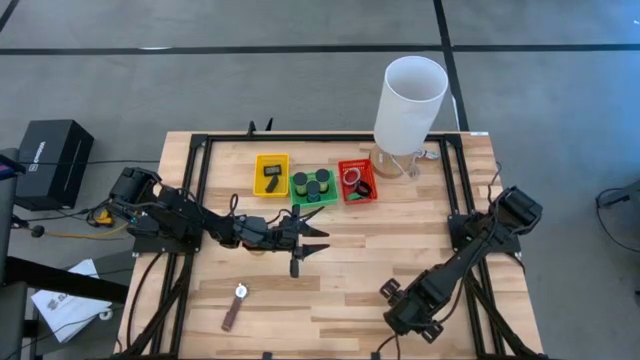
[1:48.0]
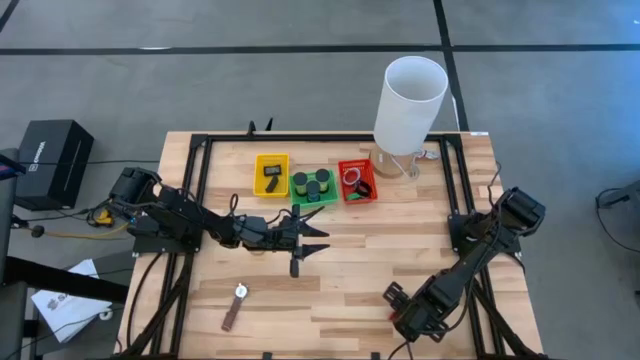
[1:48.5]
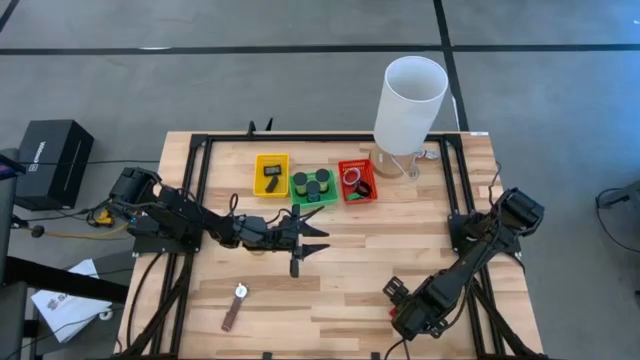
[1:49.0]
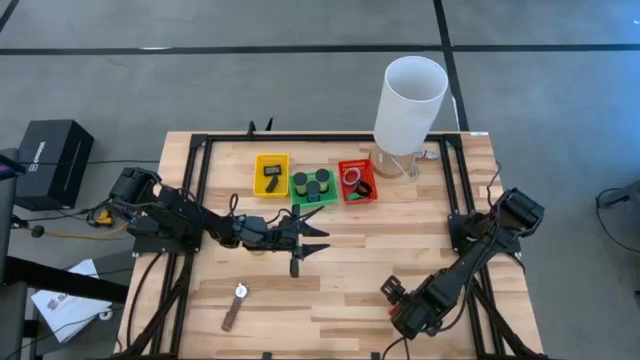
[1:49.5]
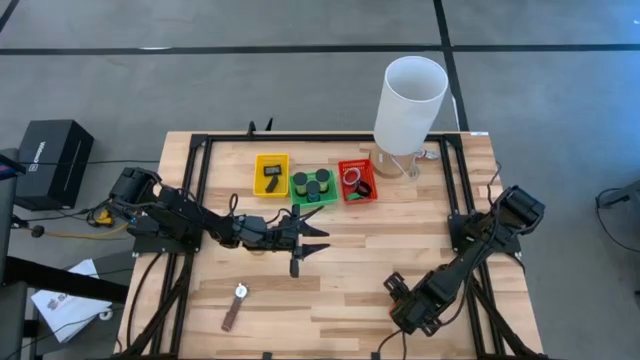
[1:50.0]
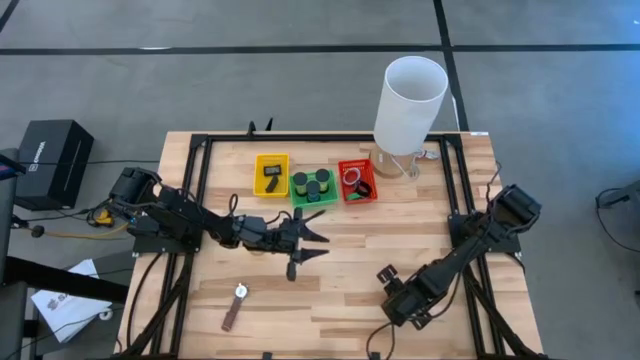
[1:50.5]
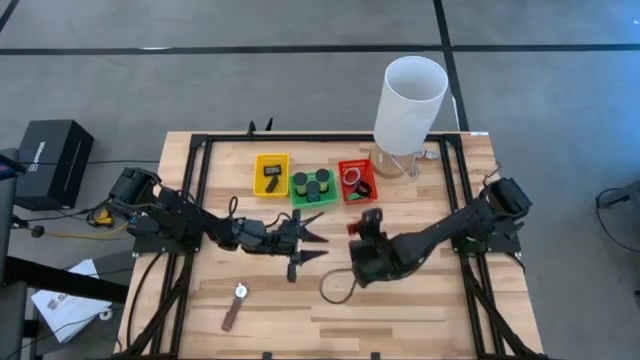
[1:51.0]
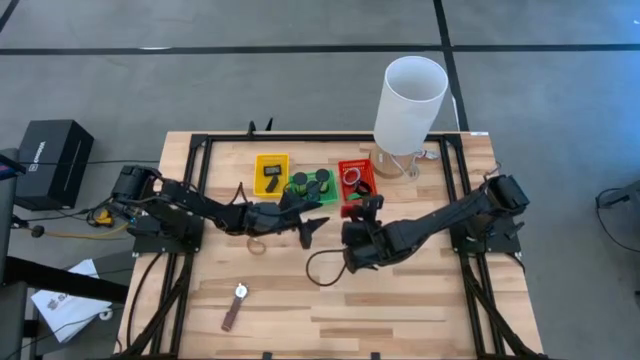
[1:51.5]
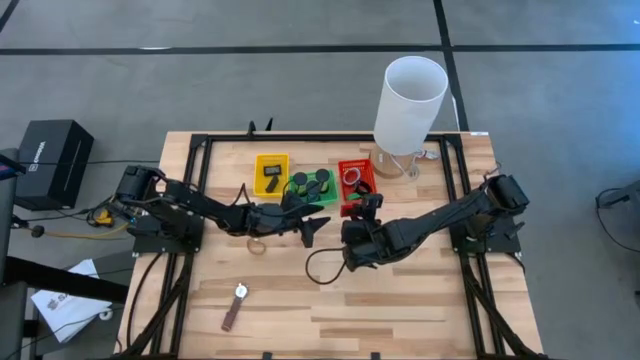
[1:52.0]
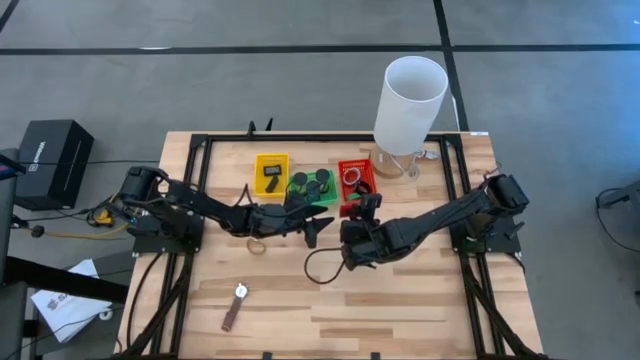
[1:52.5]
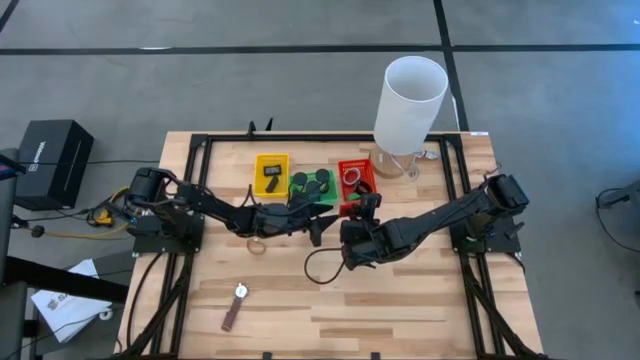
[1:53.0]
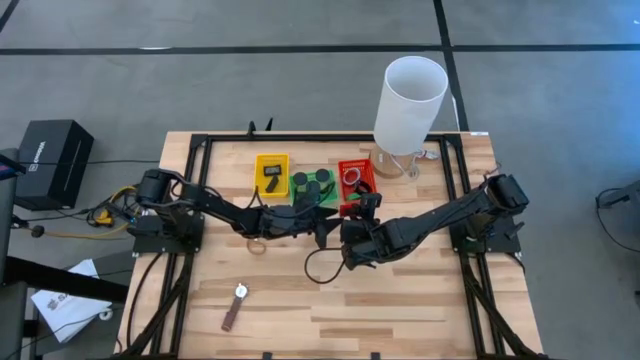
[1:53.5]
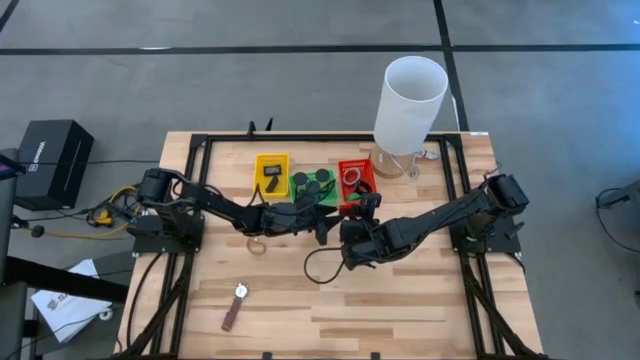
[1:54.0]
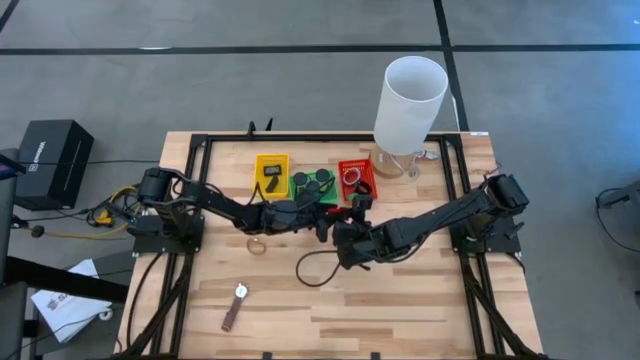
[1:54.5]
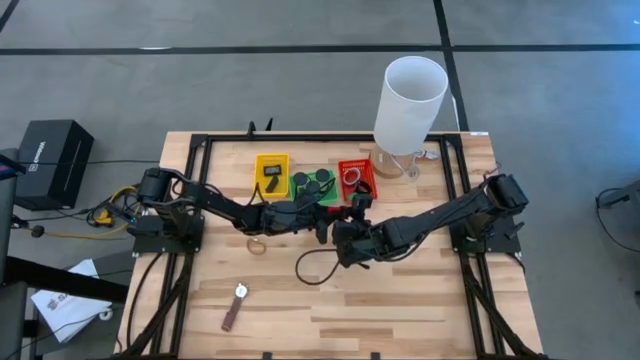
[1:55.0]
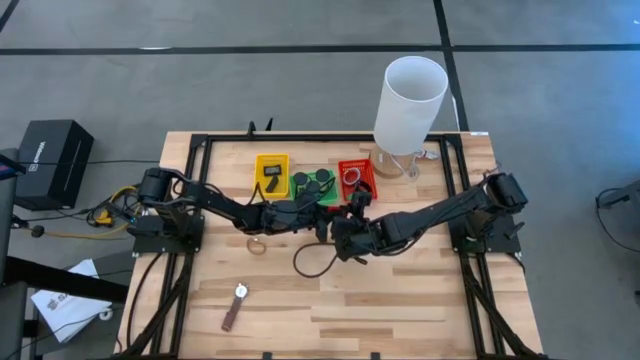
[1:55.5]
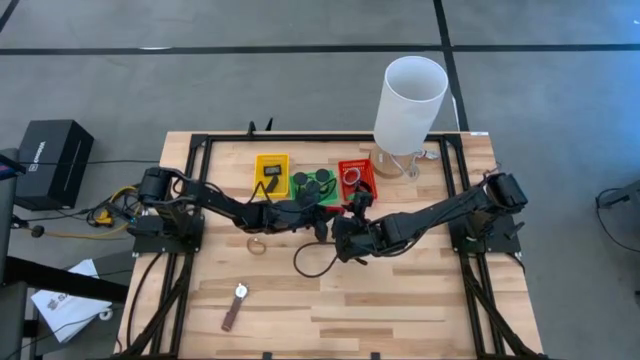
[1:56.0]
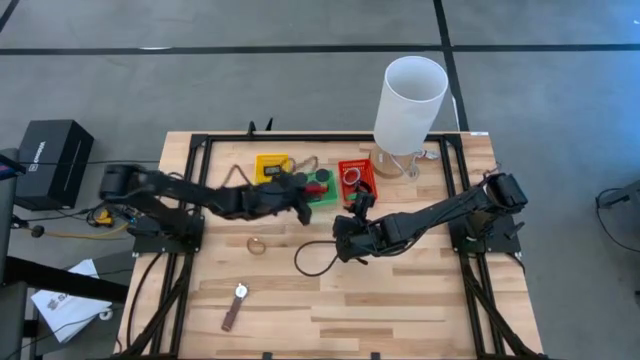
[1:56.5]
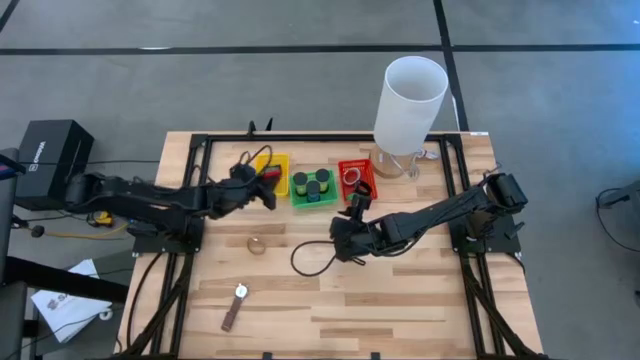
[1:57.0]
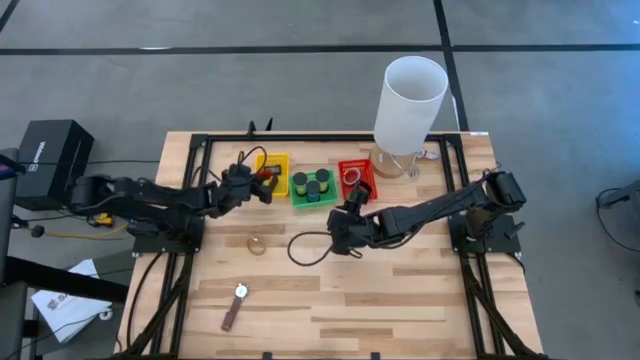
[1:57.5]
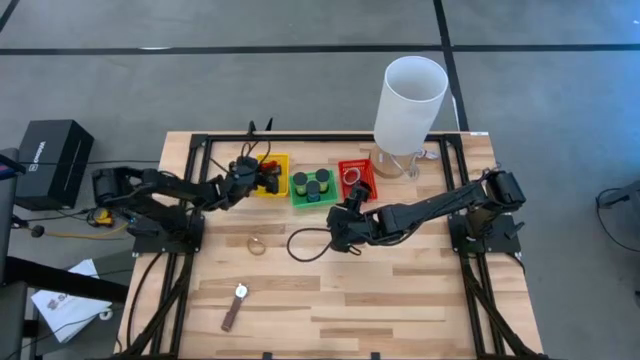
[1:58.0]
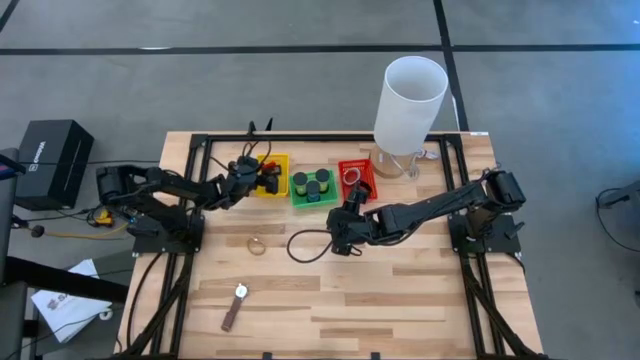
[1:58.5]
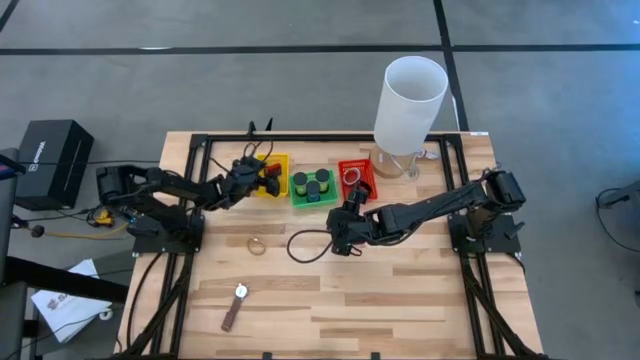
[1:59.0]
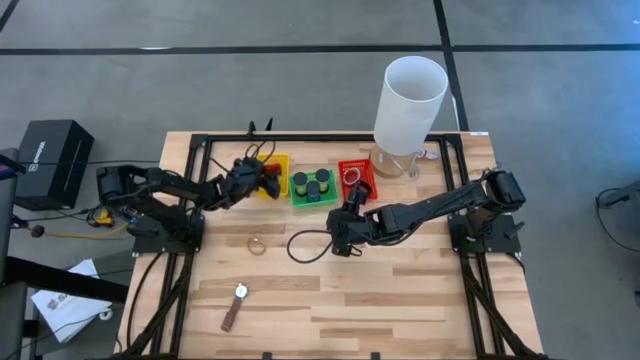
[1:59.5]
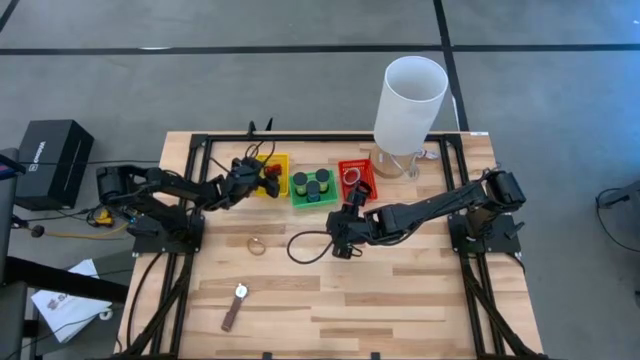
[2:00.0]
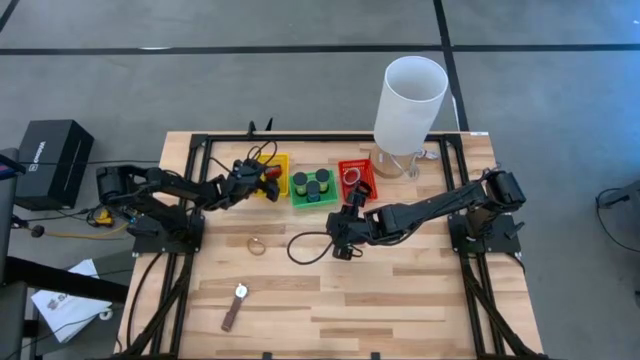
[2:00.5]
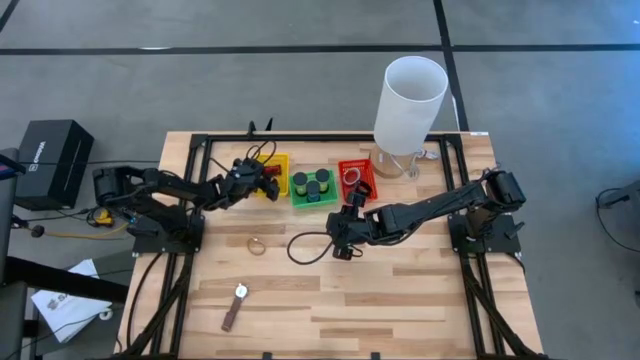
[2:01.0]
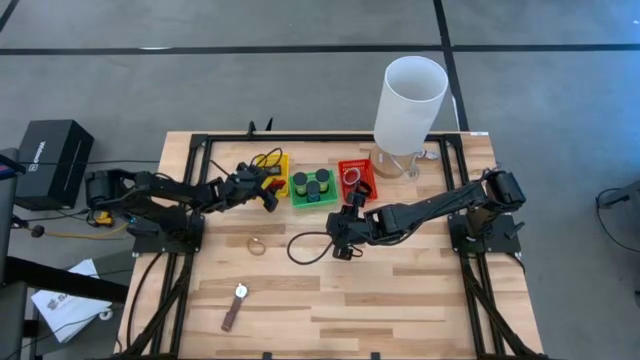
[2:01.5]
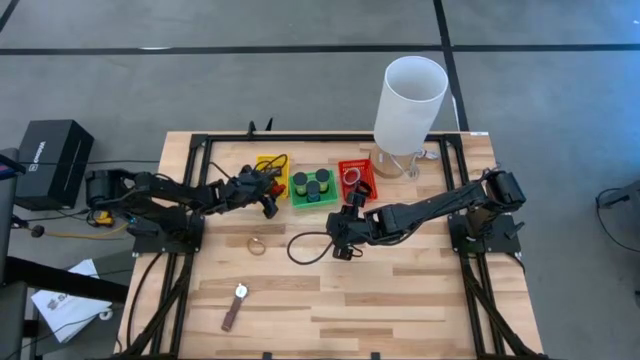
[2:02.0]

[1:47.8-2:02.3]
Task: Pick & Place Office items
Put the red digital clock into the yellow basket

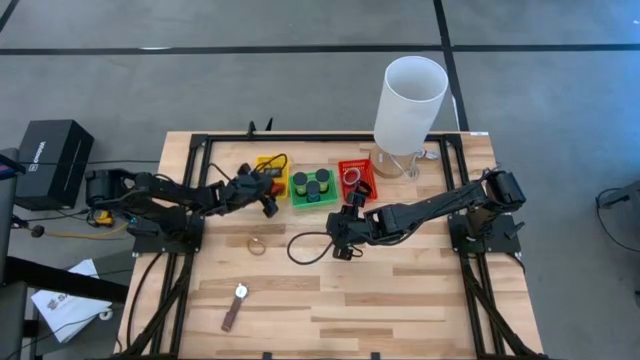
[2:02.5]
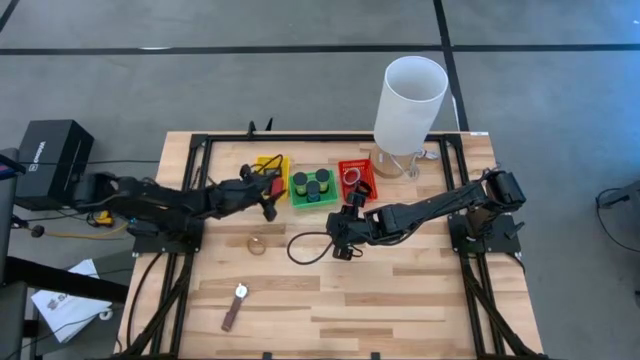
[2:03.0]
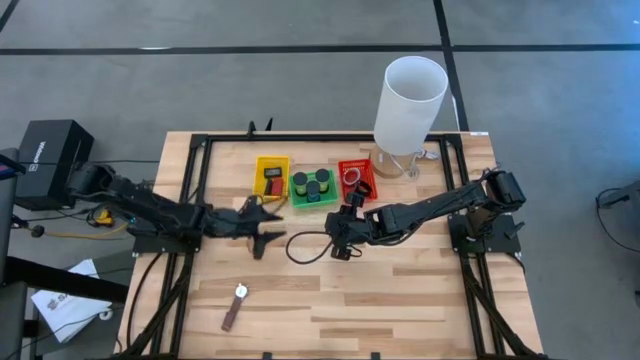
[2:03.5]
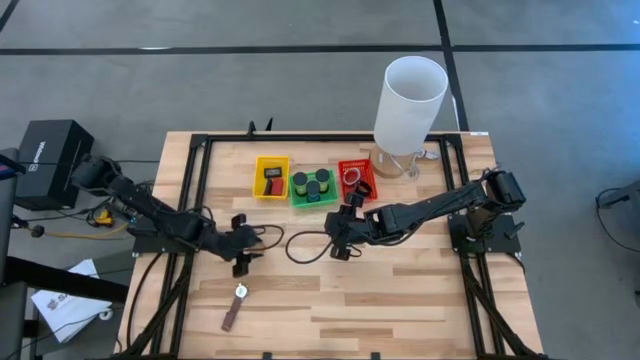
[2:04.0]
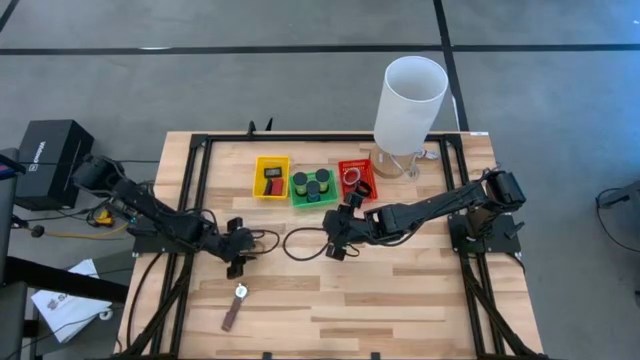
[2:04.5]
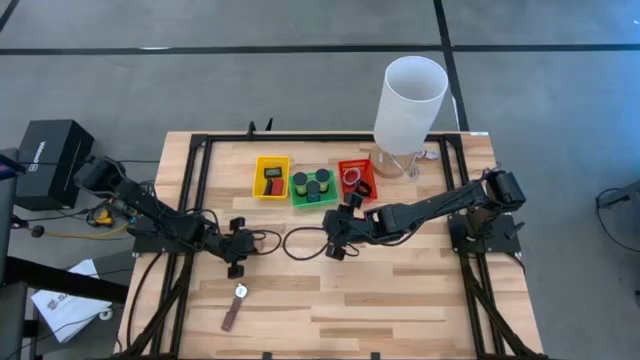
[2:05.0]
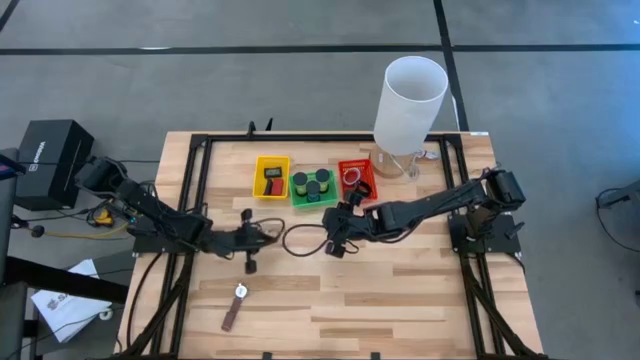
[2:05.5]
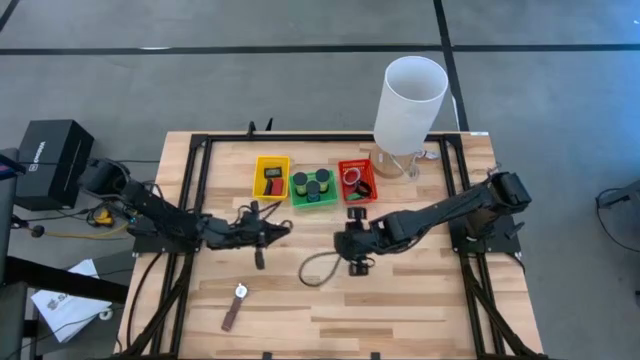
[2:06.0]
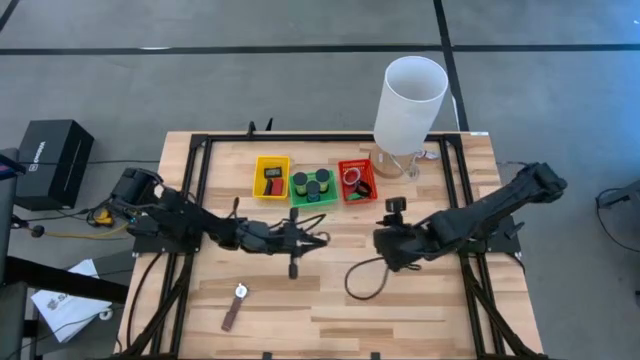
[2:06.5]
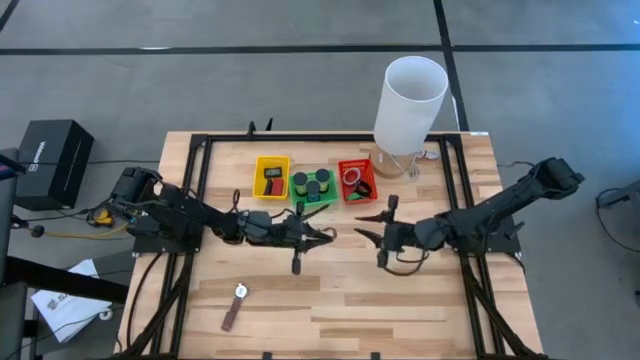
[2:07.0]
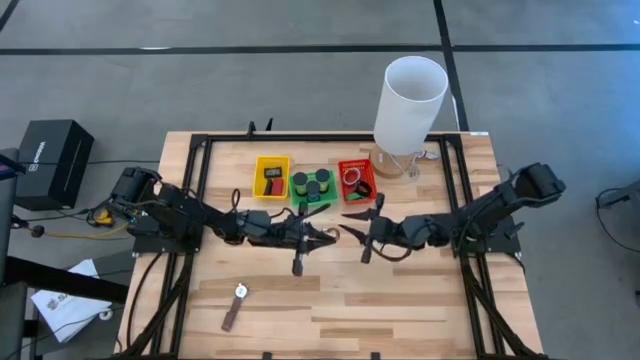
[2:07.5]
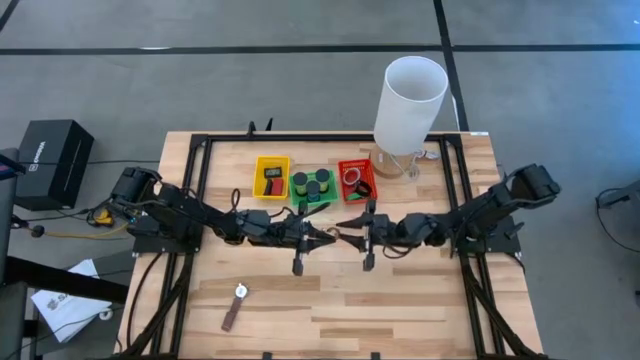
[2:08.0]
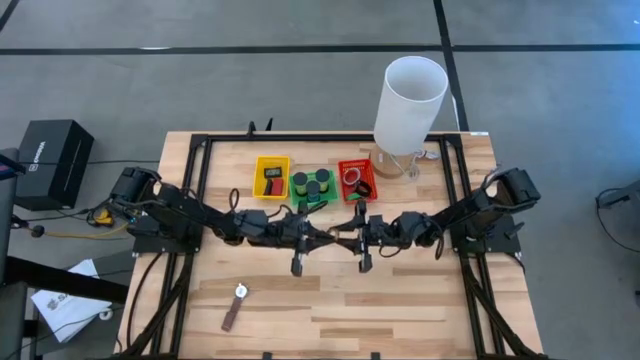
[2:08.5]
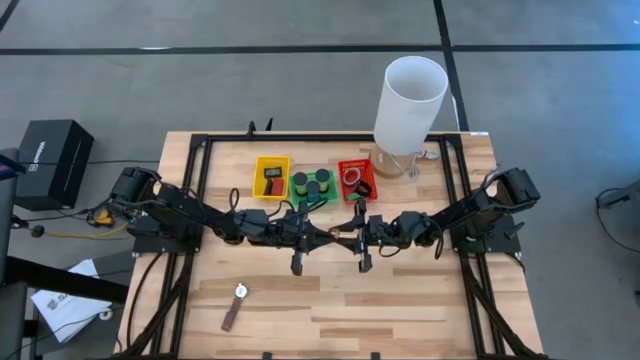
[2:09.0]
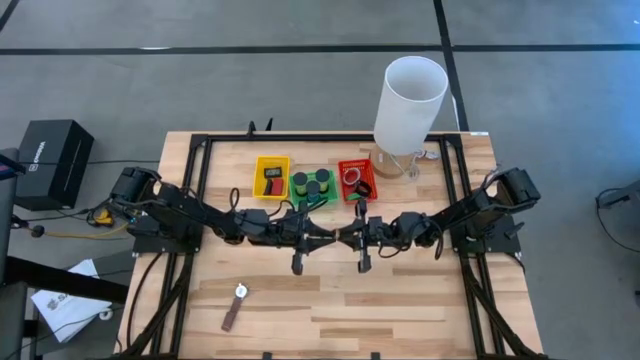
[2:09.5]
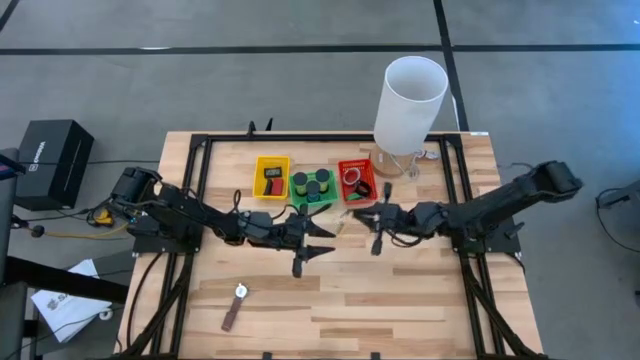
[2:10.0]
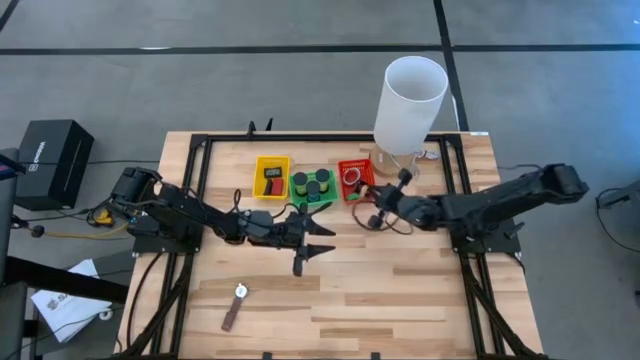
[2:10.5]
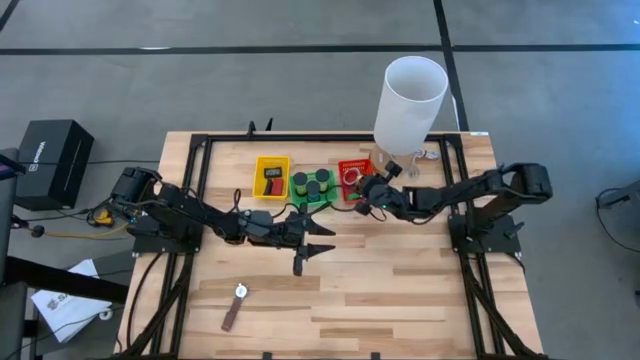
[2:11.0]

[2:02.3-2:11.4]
Put the gold wrist watch into the red basket
